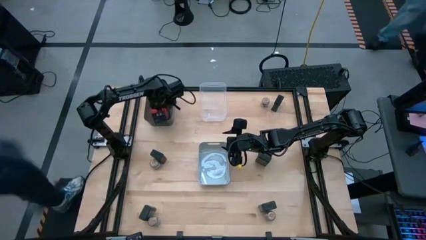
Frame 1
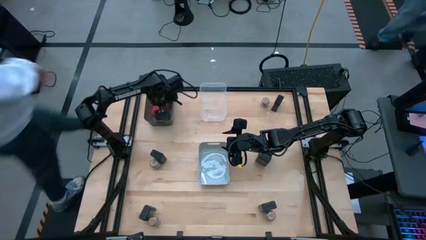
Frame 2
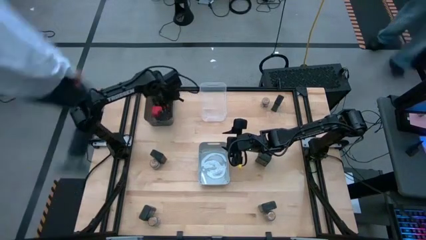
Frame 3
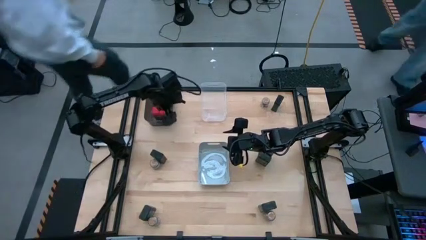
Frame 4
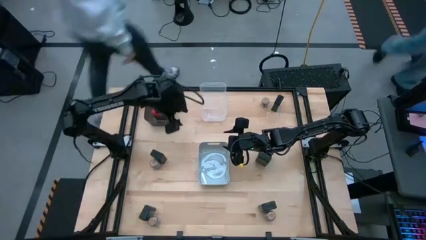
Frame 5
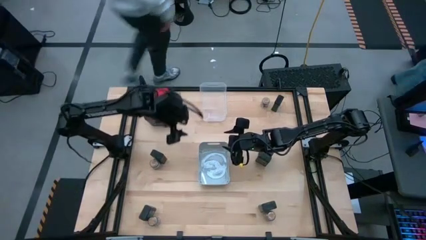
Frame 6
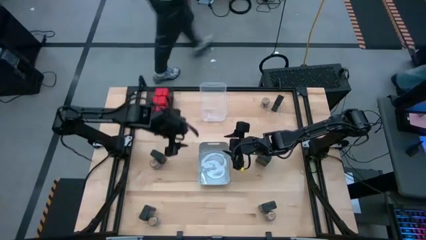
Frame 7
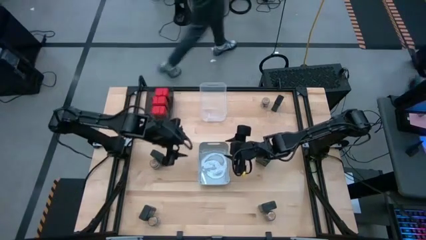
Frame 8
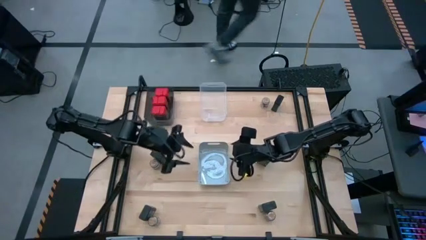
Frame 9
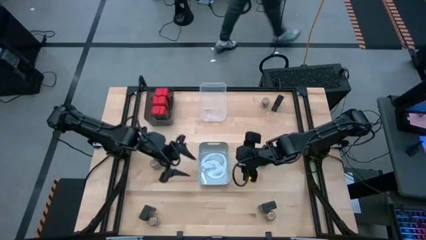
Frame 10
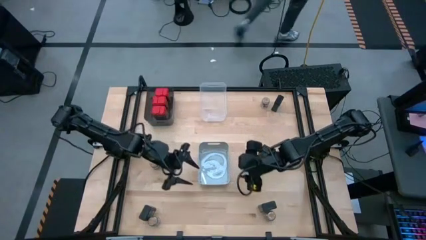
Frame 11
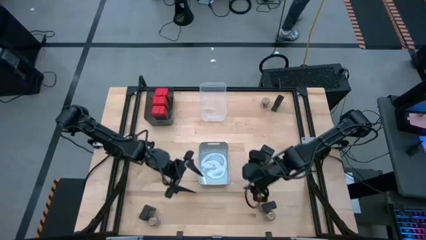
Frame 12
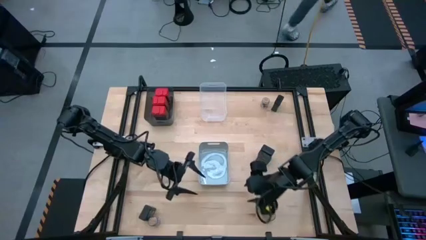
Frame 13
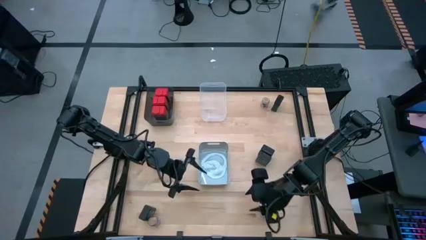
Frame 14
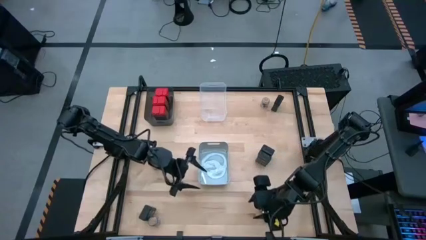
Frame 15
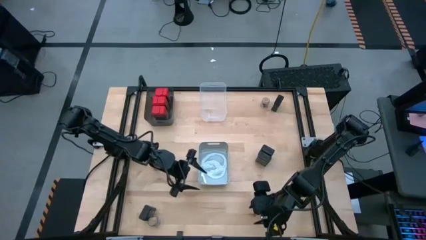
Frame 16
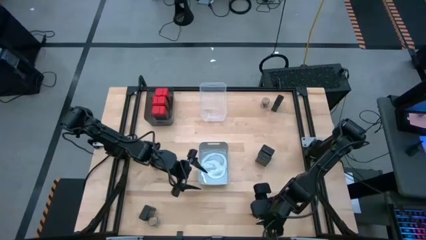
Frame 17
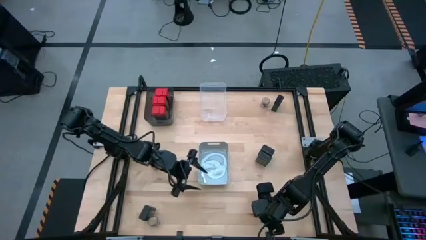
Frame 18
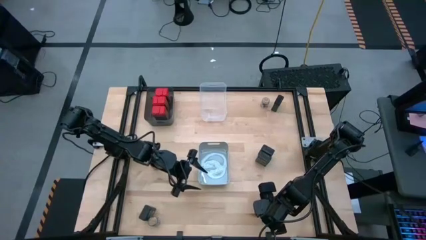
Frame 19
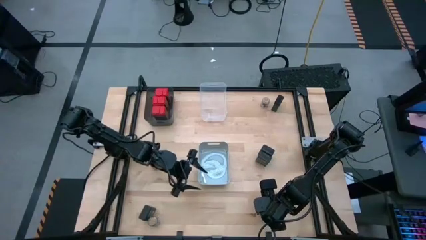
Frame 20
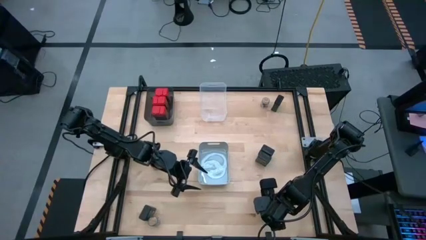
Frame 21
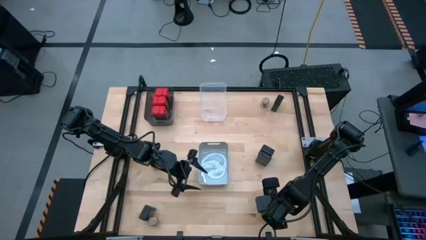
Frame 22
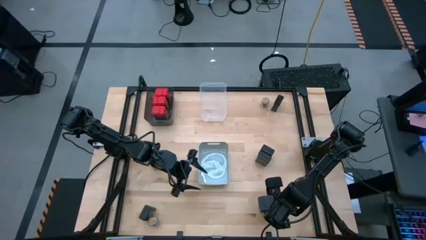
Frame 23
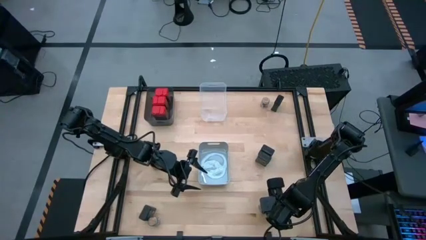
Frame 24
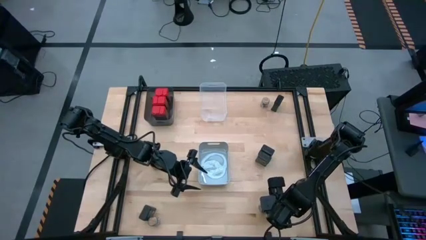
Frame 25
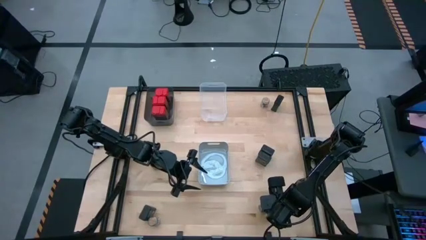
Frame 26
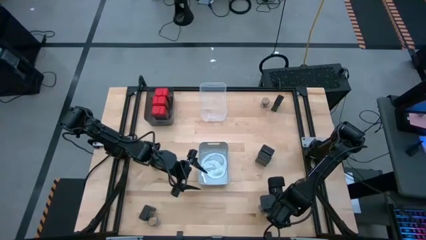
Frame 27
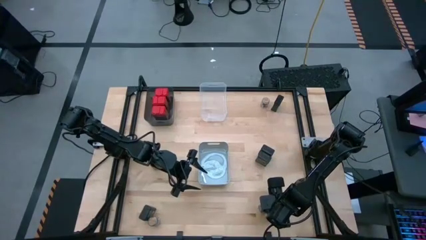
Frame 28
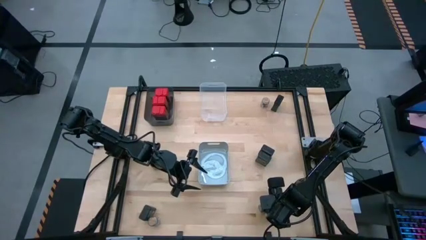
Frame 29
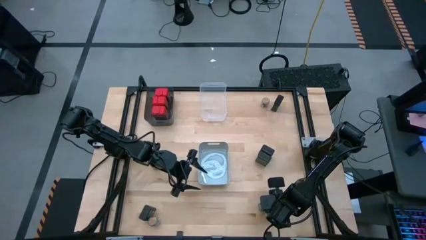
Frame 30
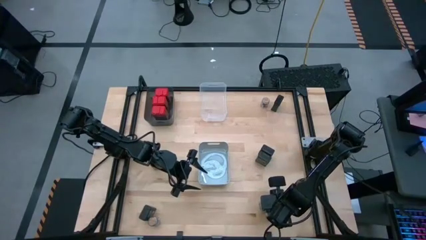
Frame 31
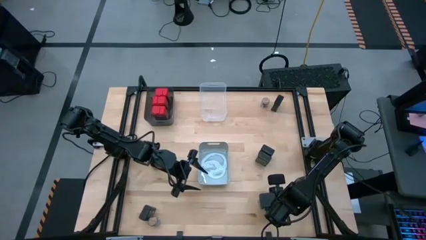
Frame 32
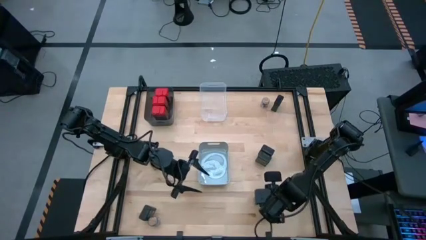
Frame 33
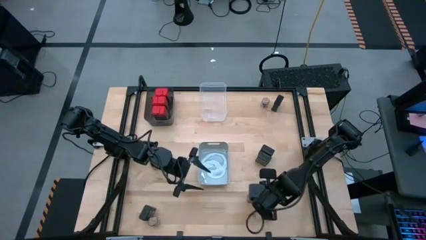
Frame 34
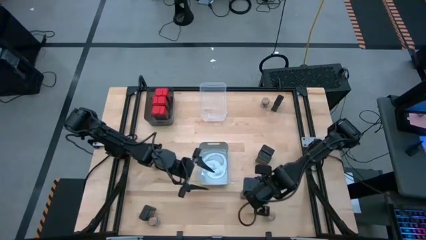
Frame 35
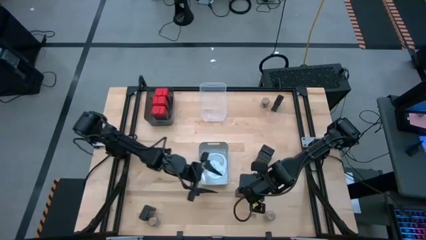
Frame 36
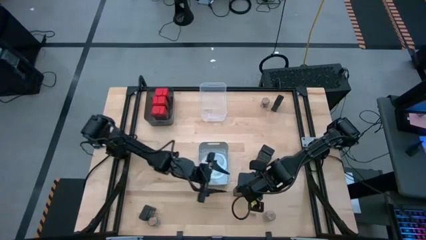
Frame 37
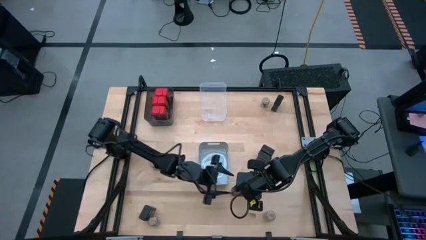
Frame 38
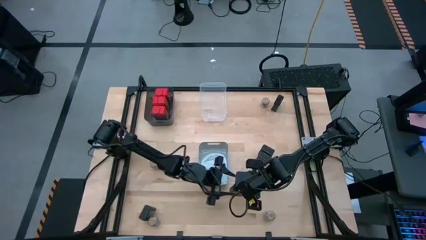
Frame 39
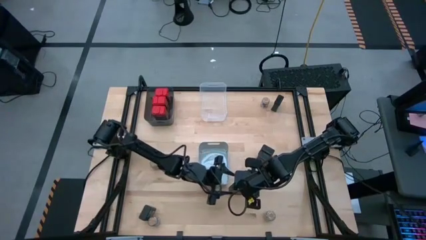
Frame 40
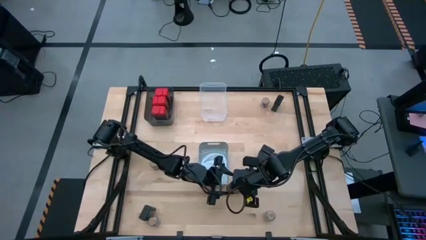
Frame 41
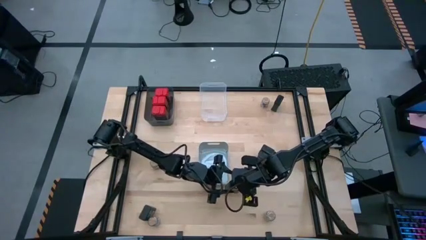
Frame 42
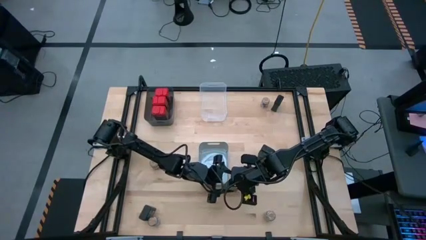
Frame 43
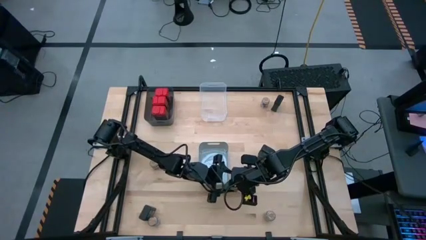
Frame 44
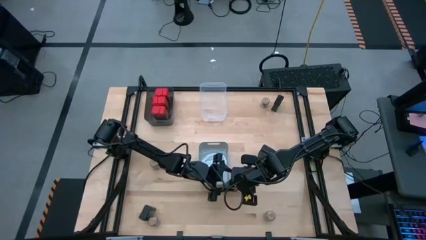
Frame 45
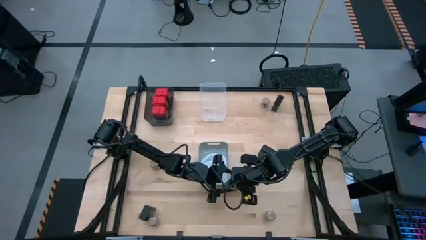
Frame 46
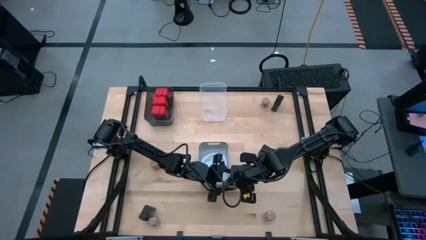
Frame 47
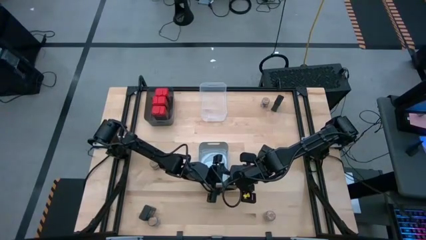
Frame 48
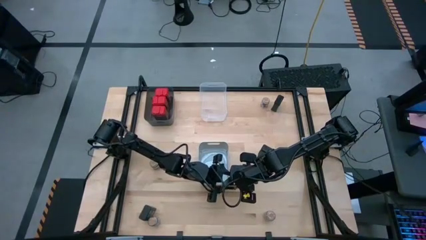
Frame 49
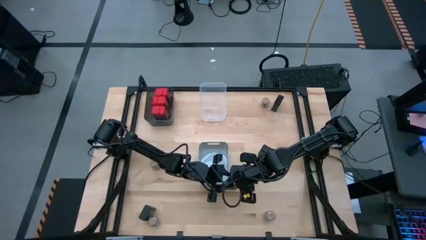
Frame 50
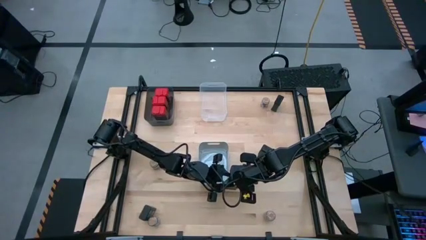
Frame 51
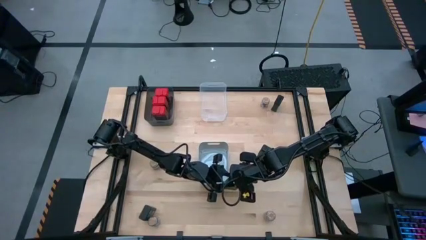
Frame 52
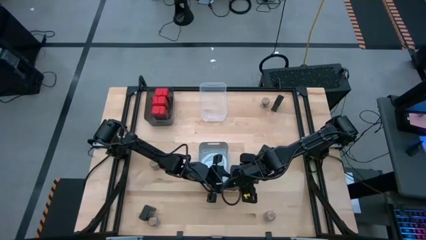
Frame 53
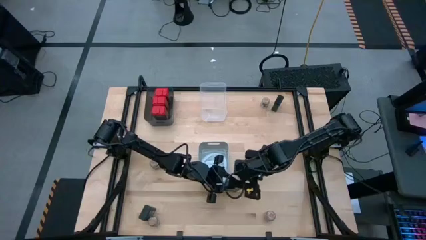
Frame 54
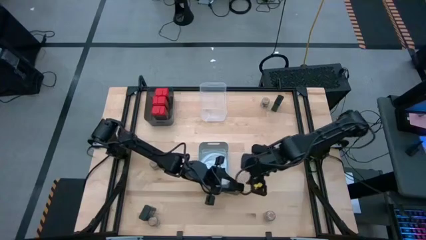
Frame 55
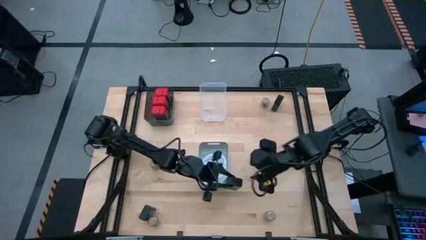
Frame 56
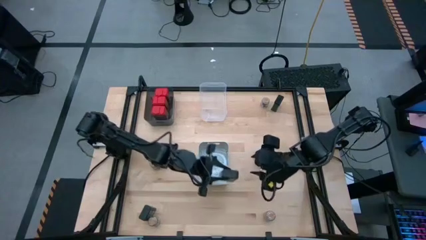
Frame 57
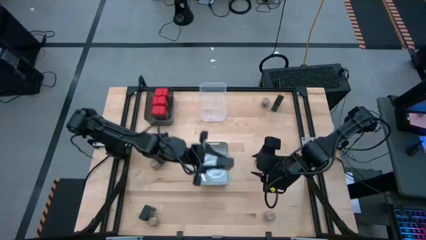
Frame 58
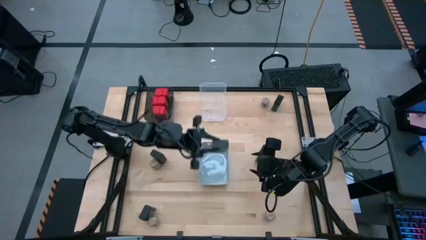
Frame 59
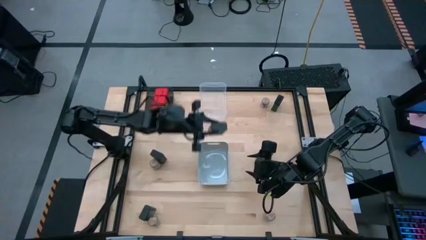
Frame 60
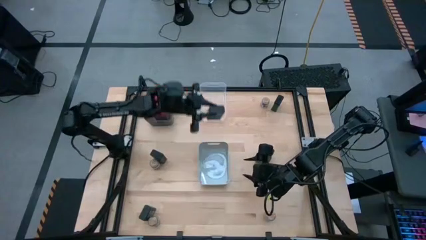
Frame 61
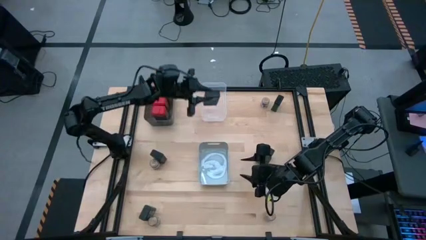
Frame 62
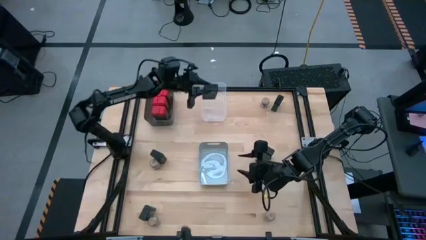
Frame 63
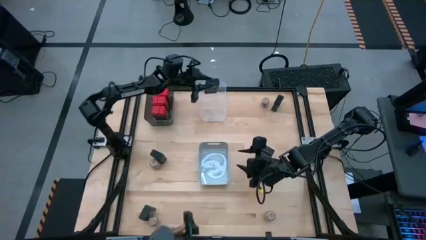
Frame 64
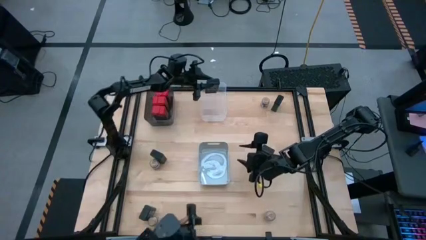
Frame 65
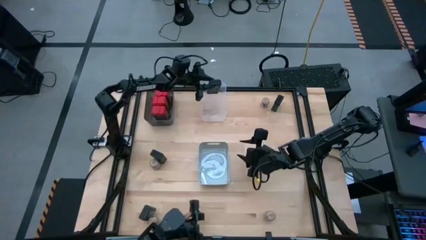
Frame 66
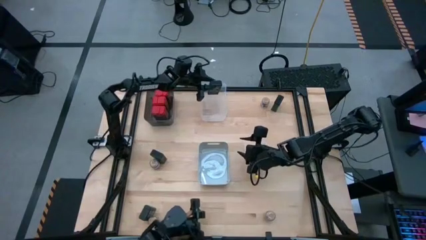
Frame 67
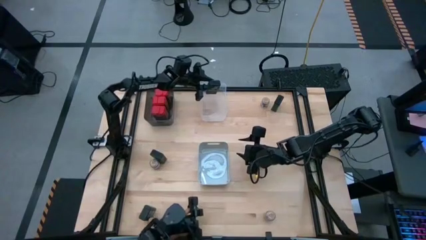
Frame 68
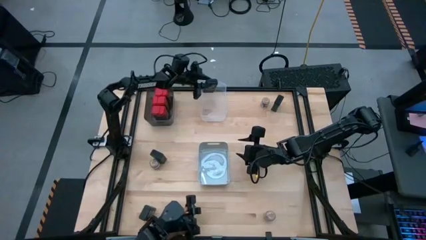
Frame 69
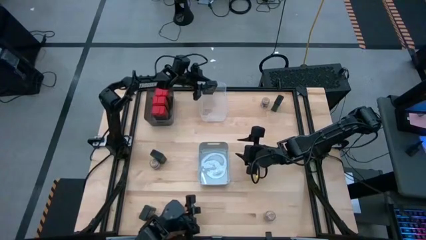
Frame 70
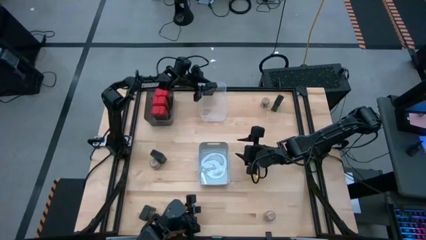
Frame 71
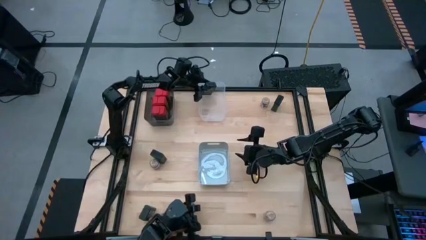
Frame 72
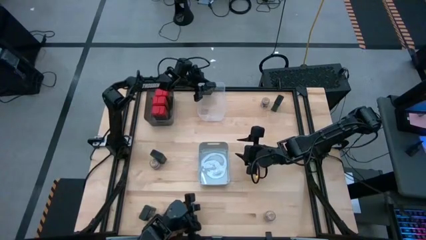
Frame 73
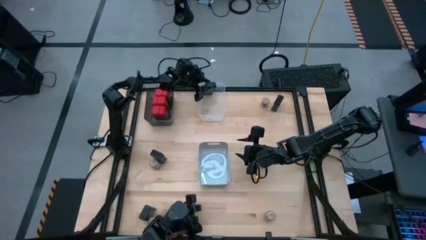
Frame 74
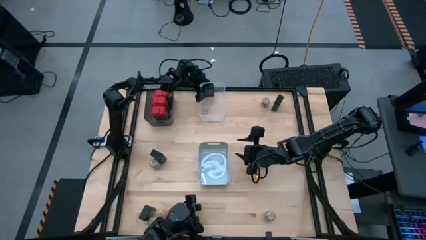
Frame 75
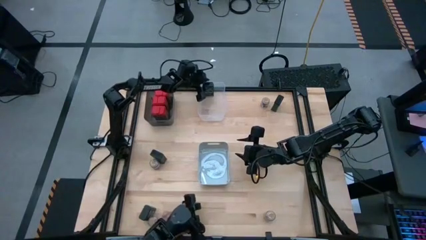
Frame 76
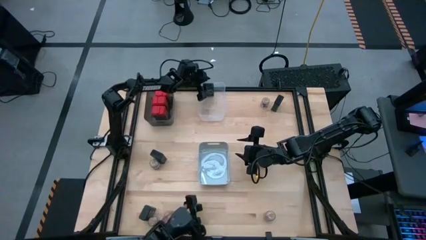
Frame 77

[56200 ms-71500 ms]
Task: Sort spices by type
Put the black seasoning can into the transparent bin

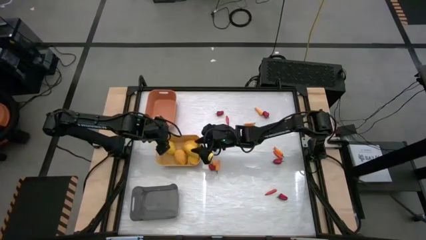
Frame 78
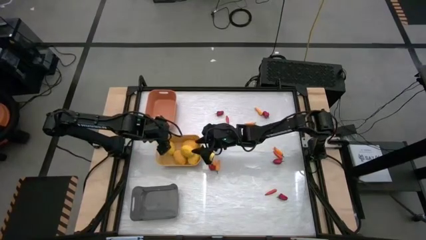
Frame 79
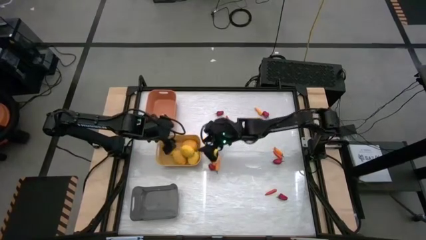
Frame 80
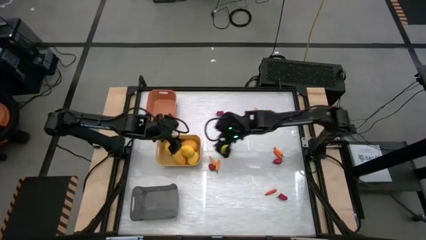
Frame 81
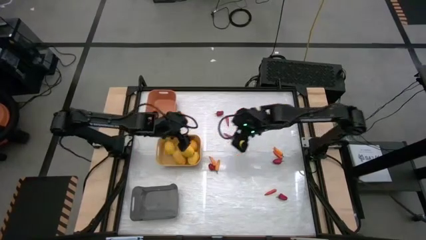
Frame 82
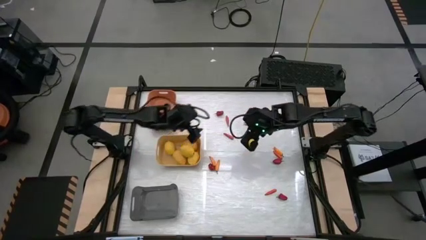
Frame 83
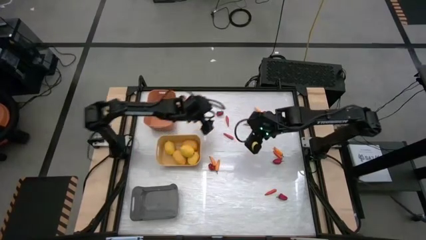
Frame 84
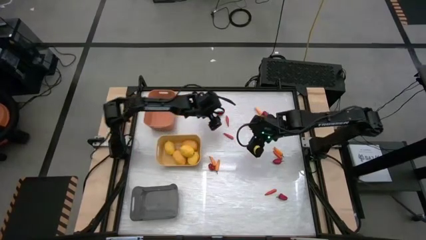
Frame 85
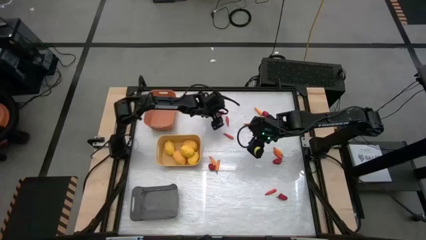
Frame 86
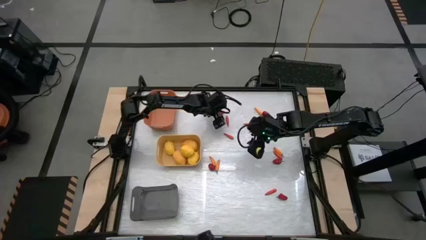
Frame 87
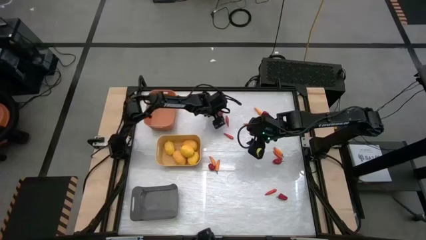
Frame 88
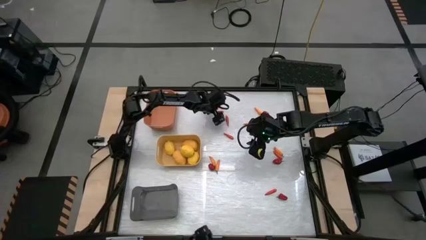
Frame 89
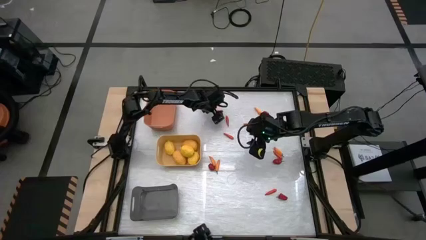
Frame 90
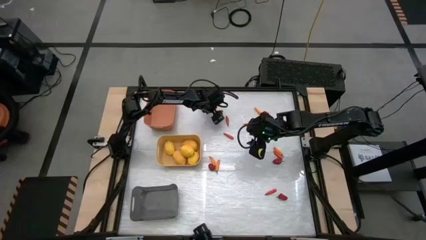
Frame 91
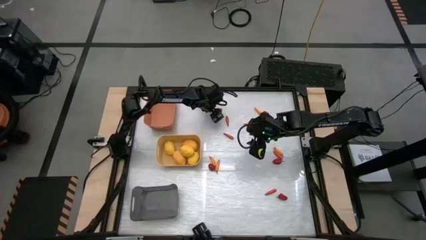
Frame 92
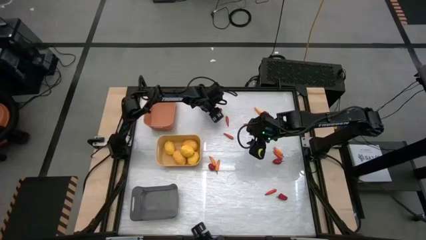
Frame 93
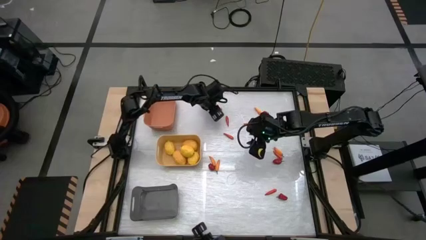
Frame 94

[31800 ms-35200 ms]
Task: Sort produce into baskets
Put the red chili pepper into the orange bin
